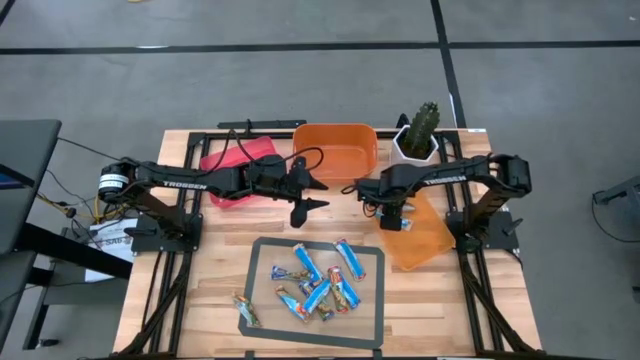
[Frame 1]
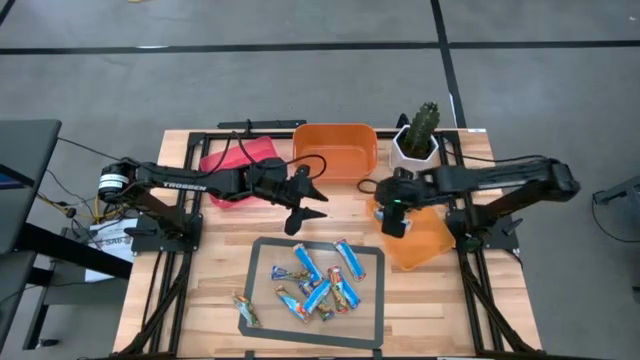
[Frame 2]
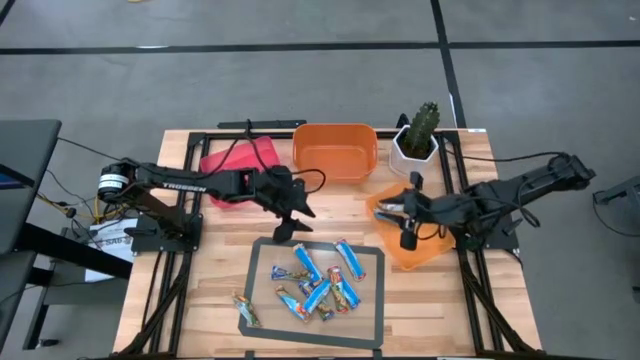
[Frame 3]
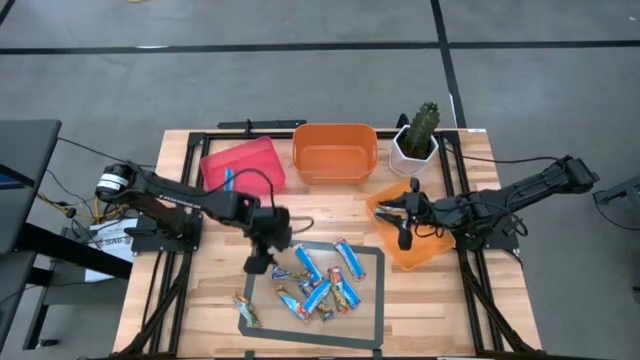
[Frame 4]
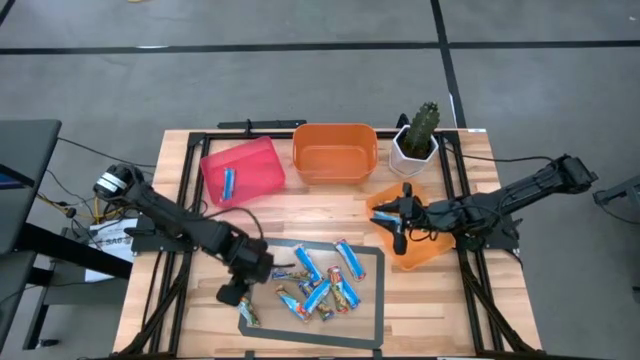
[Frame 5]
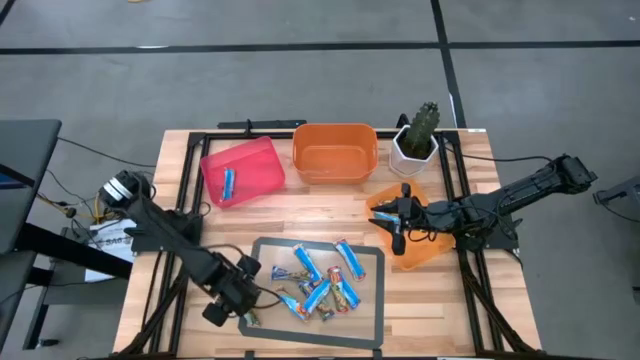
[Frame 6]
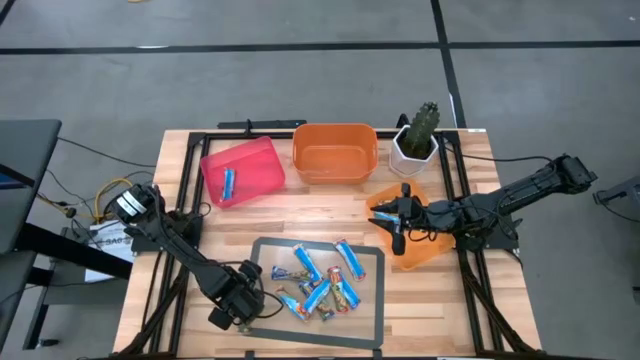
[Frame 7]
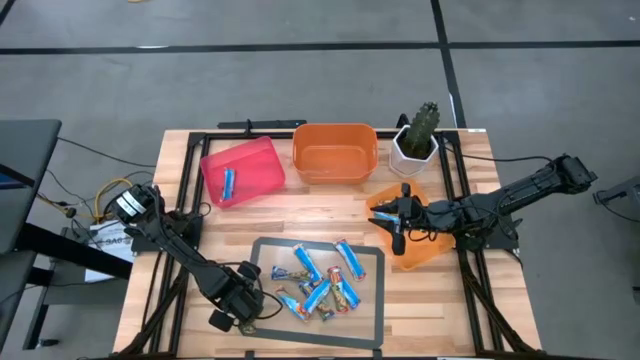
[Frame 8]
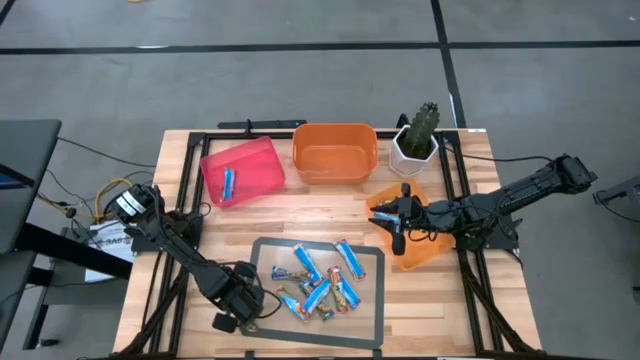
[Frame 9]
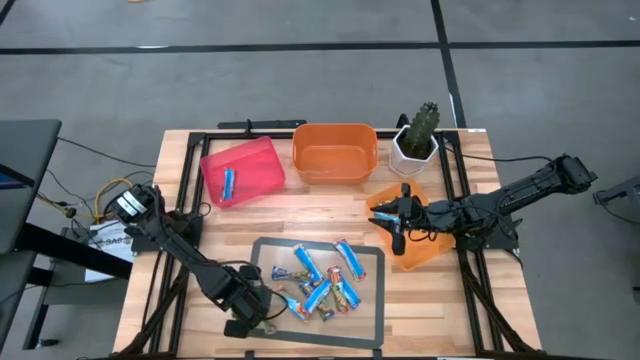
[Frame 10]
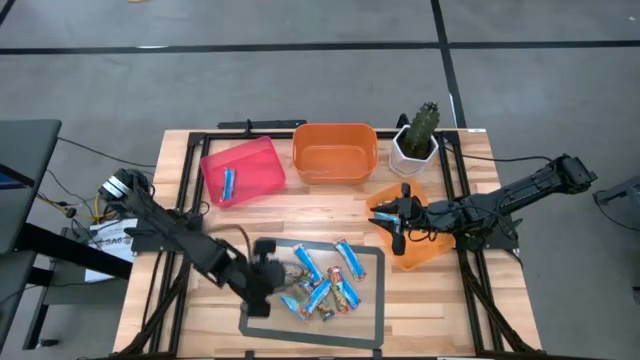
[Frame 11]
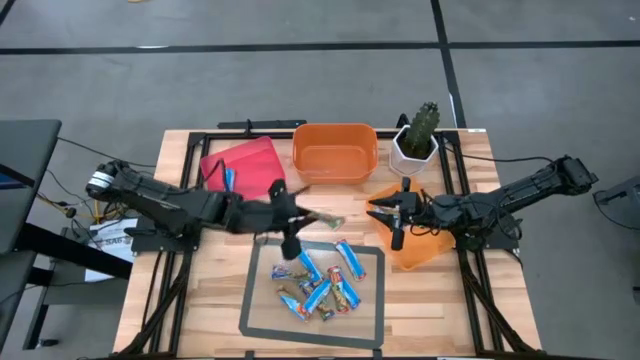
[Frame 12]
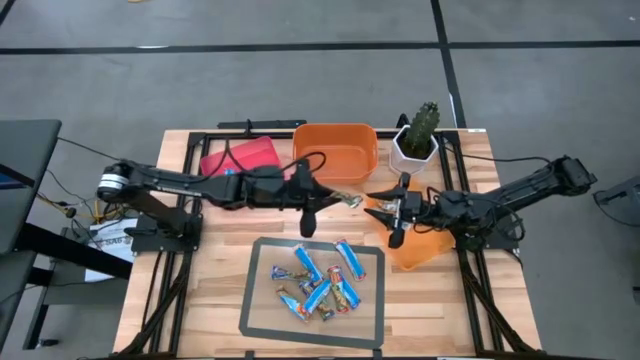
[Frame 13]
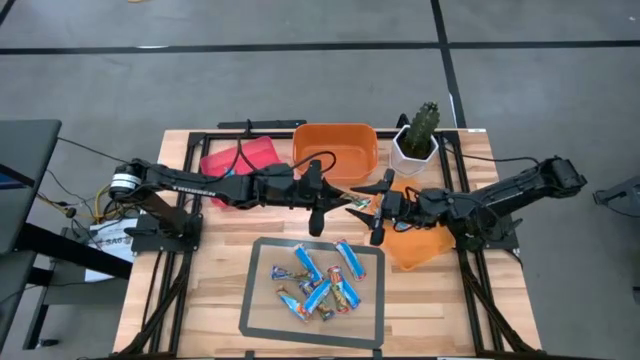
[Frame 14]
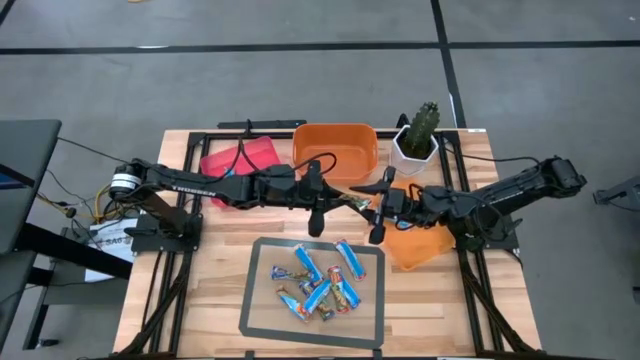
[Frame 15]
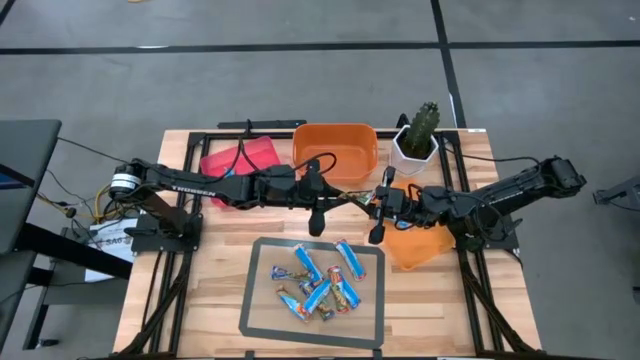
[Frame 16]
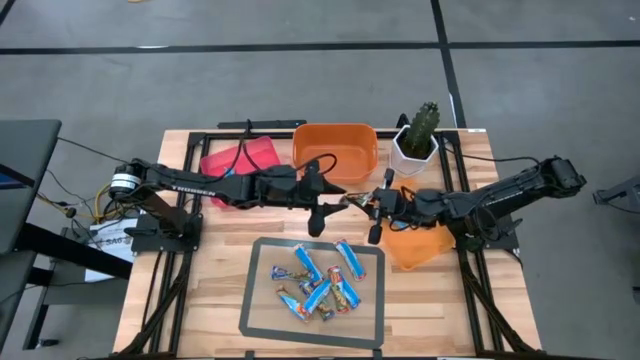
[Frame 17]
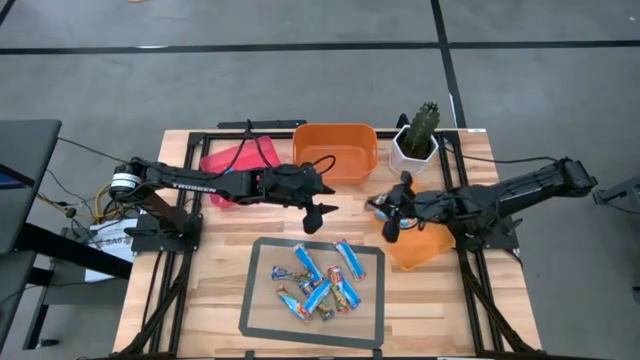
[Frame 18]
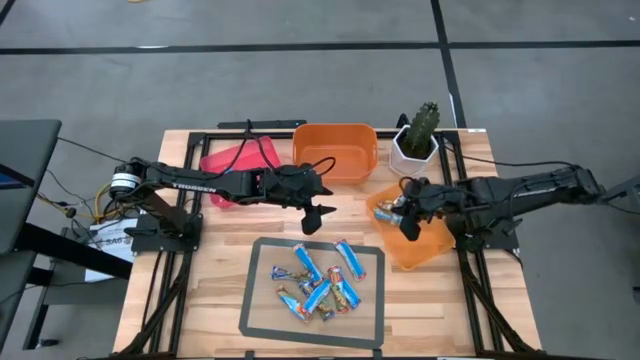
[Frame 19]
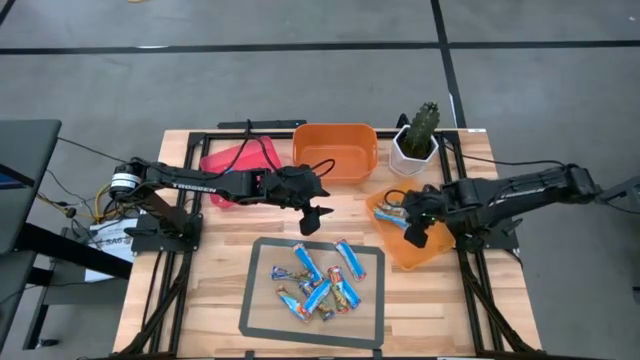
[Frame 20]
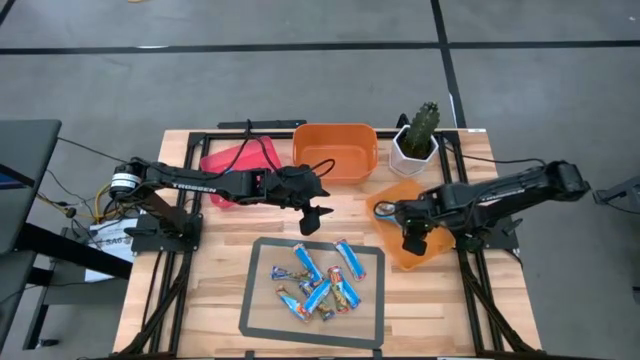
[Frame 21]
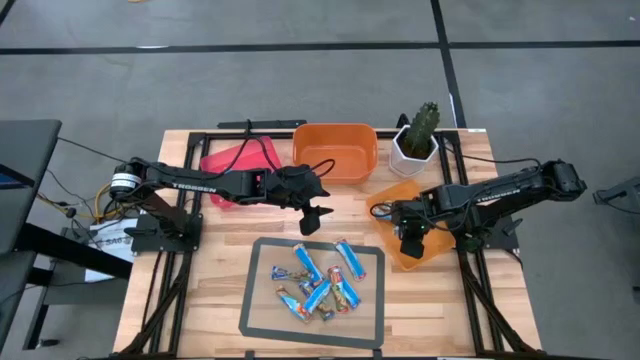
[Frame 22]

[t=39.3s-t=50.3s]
Task: Pick and place Granola Bars by type
Put the orange granola bar into the light orange bin

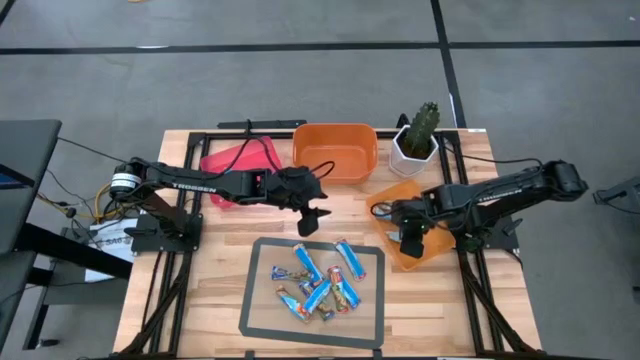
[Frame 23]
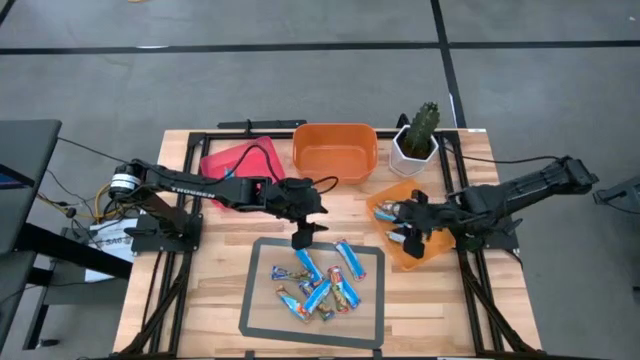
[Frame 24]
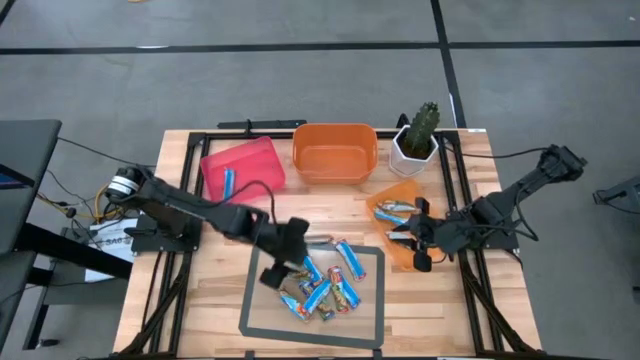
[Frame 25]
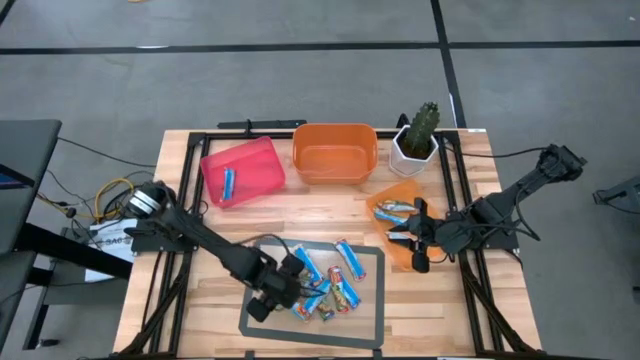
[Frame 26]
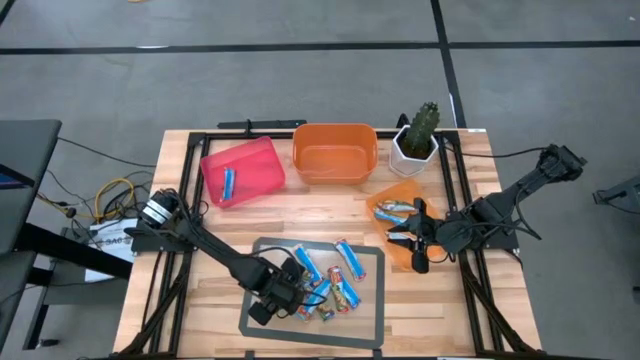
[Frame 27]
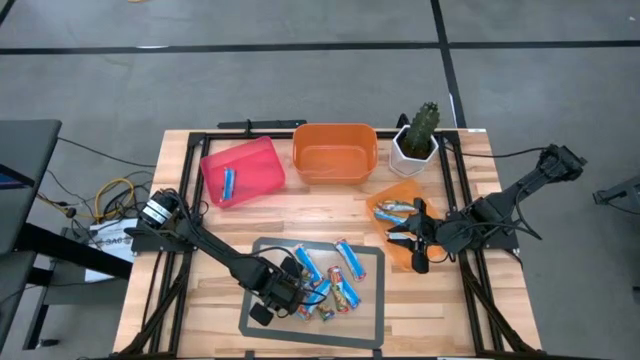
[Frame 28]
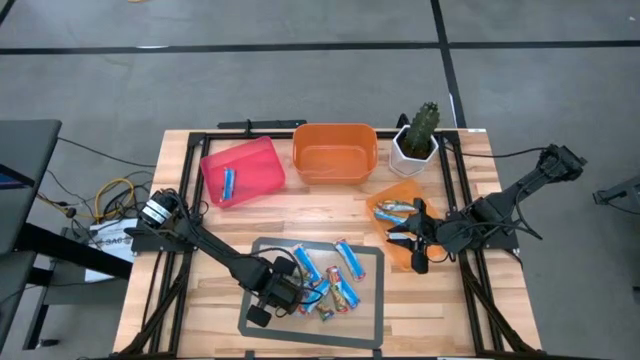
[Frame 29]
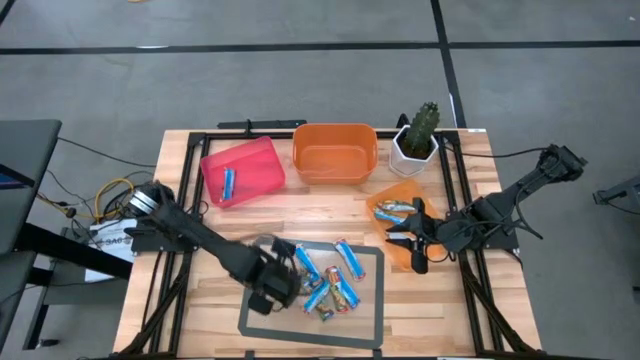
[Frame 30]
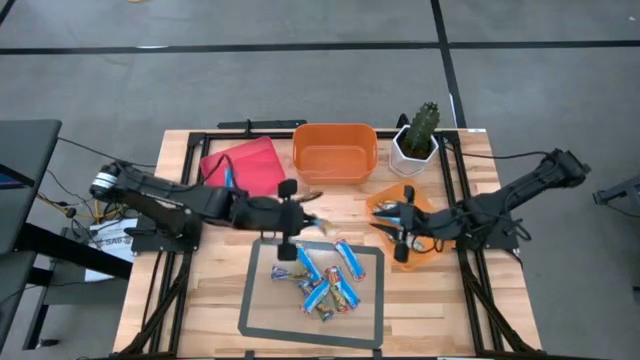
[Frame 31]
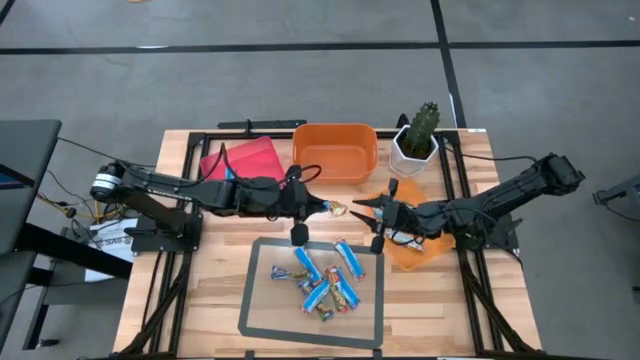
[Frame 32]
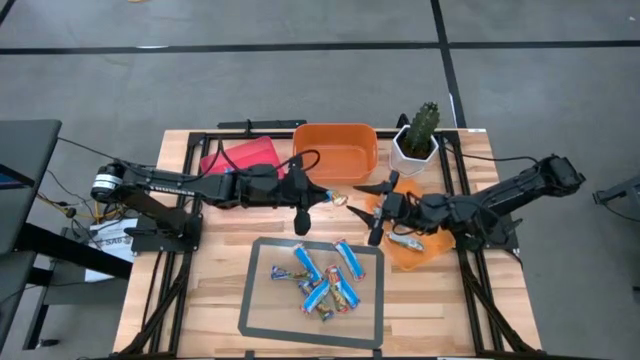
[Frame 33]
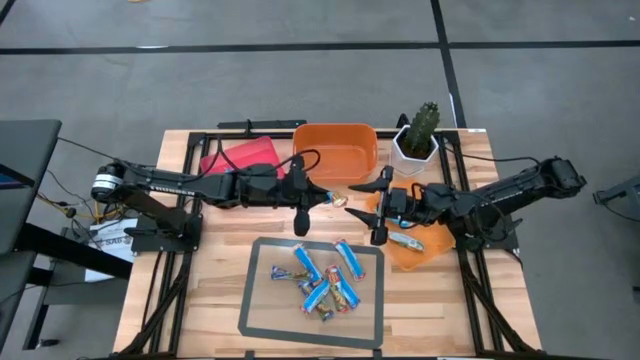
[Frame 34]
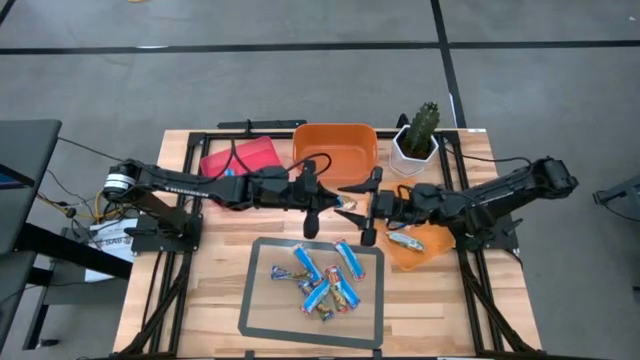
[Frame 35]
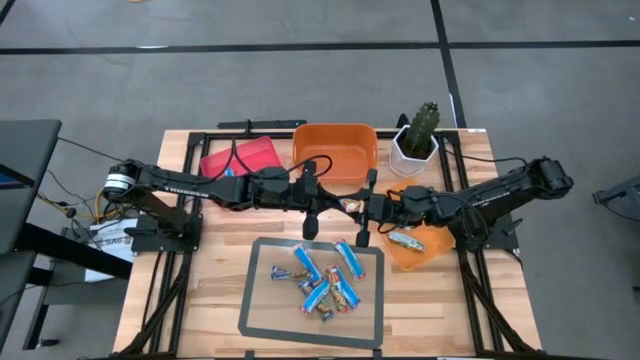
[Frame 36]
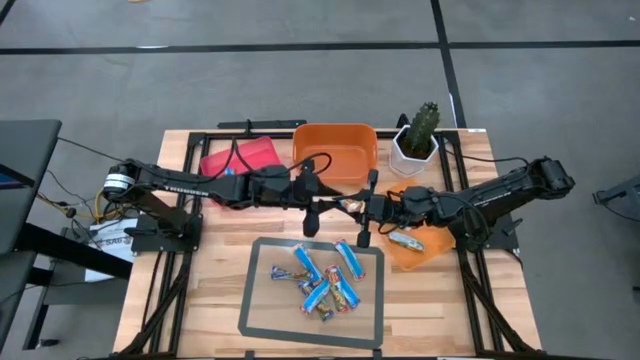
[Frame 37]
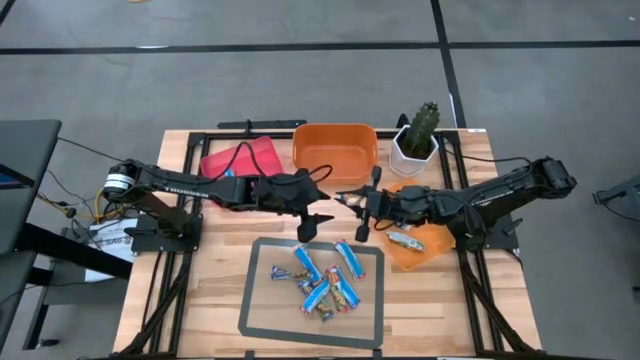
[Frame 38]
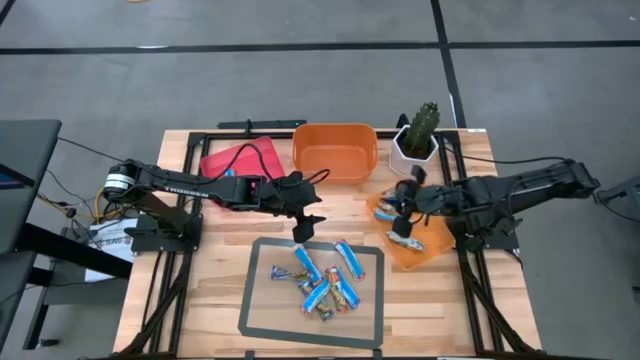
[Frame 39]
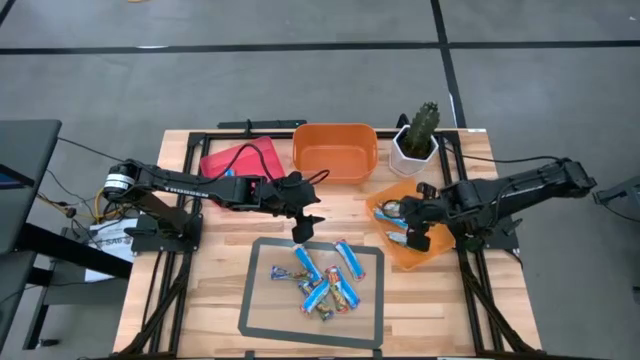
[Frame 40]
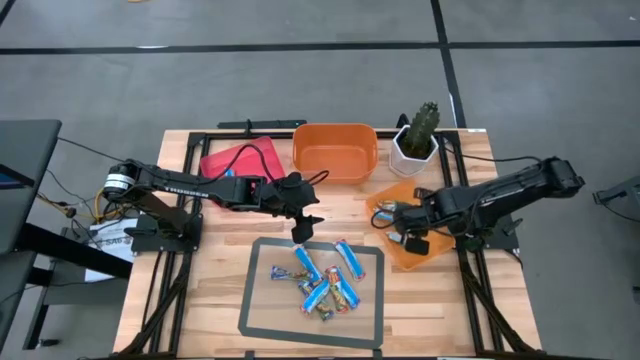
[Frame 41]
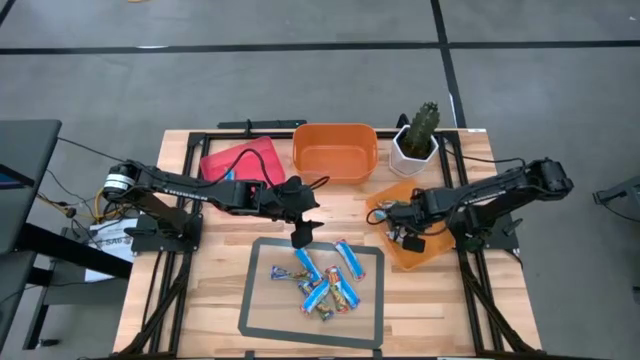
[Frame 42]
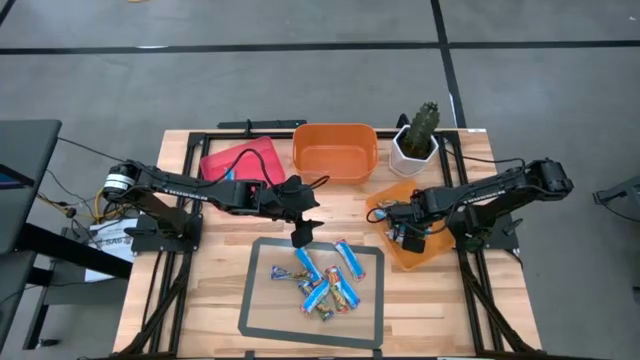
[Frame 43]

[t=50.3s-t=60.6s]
Put the orange granola bar into the light orange bin
